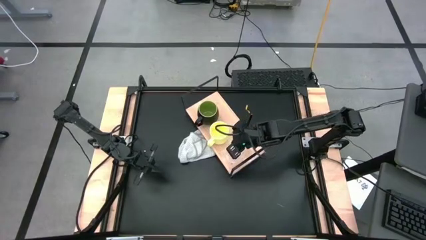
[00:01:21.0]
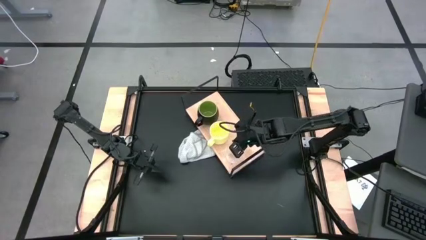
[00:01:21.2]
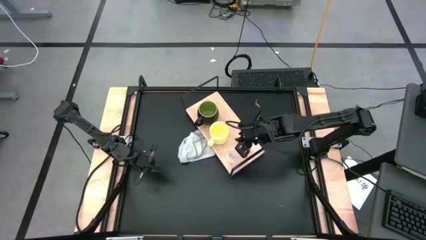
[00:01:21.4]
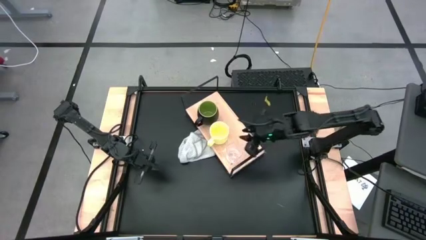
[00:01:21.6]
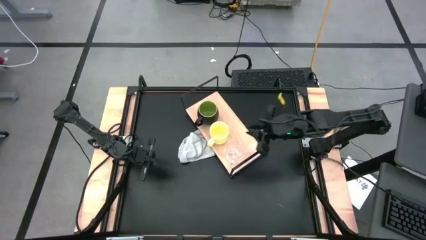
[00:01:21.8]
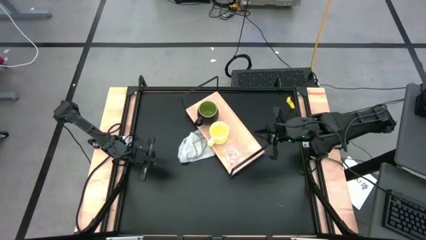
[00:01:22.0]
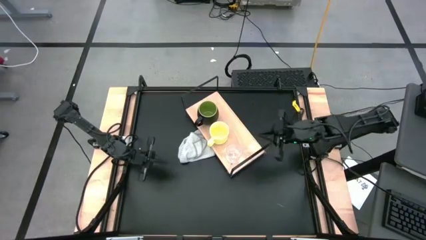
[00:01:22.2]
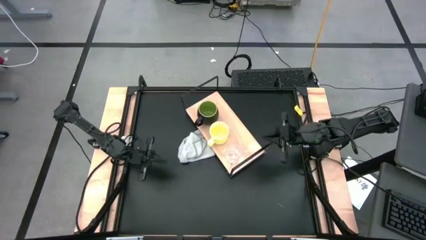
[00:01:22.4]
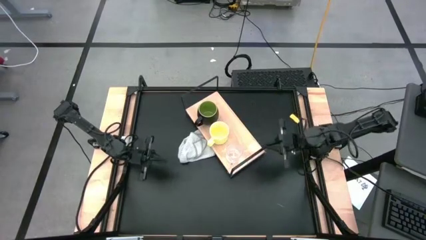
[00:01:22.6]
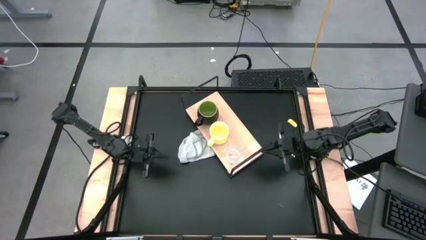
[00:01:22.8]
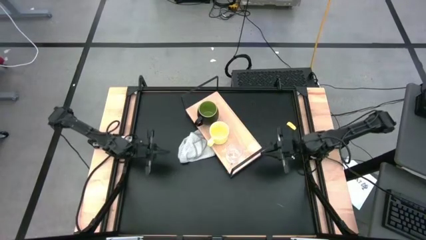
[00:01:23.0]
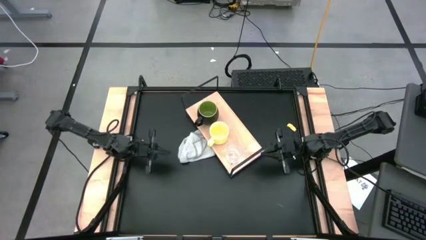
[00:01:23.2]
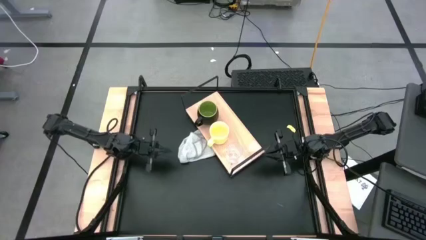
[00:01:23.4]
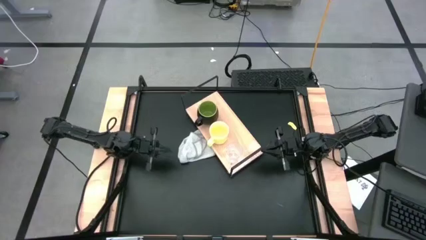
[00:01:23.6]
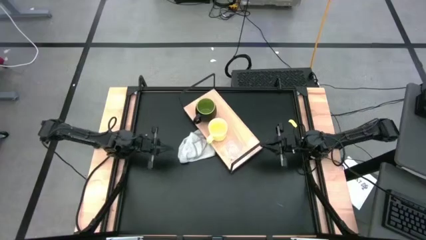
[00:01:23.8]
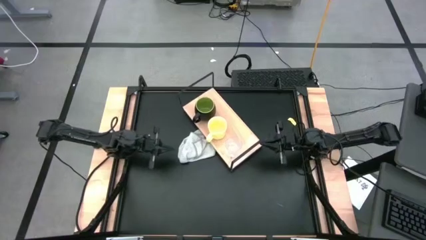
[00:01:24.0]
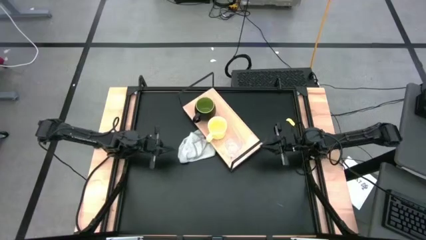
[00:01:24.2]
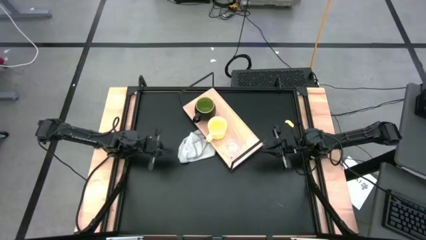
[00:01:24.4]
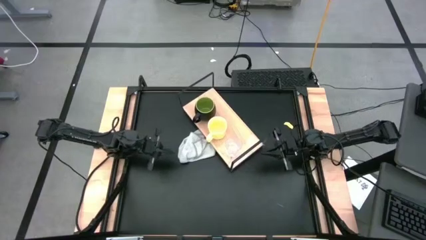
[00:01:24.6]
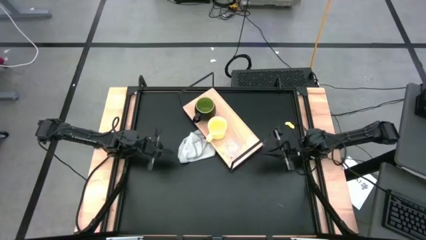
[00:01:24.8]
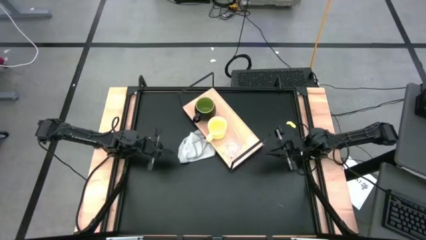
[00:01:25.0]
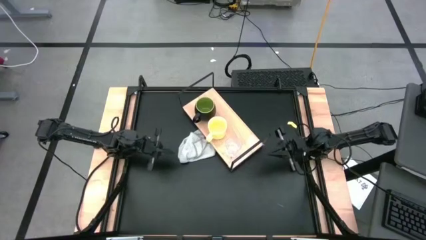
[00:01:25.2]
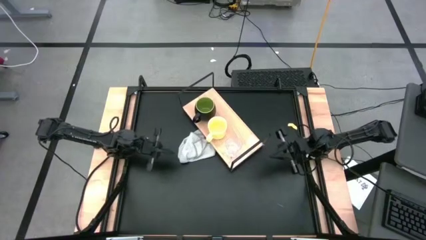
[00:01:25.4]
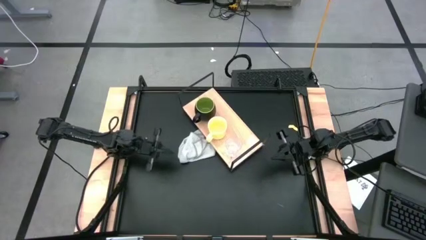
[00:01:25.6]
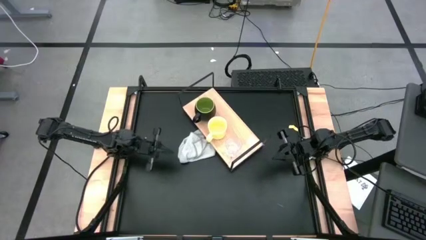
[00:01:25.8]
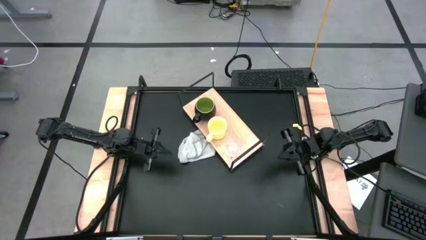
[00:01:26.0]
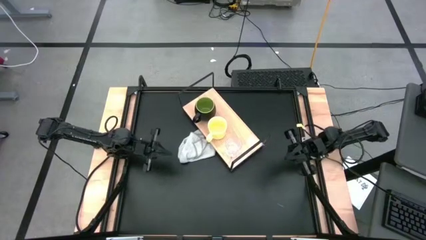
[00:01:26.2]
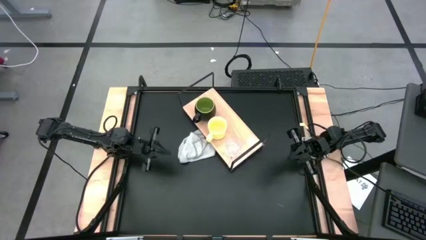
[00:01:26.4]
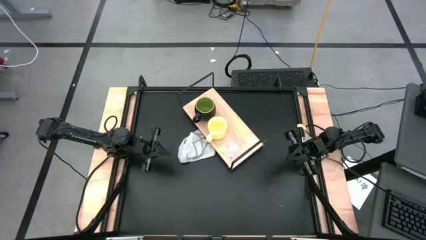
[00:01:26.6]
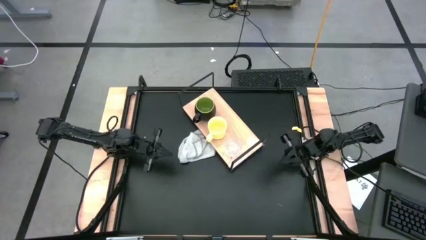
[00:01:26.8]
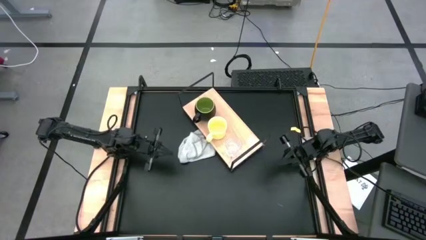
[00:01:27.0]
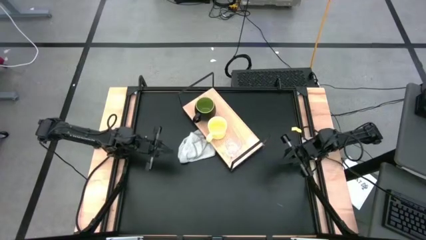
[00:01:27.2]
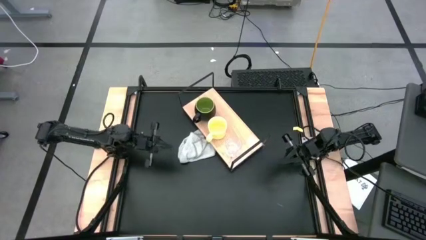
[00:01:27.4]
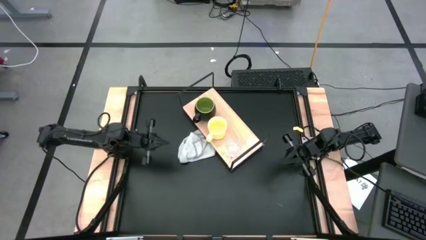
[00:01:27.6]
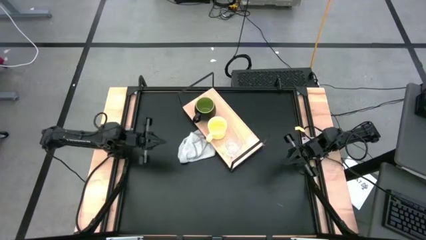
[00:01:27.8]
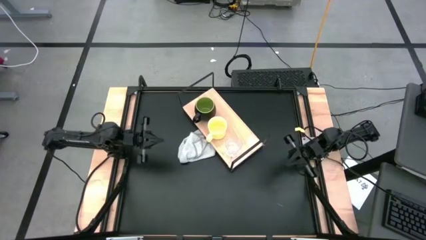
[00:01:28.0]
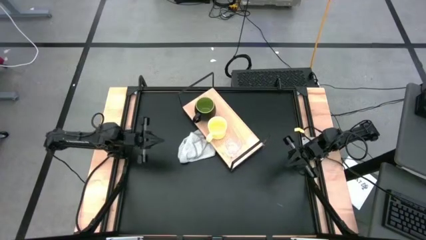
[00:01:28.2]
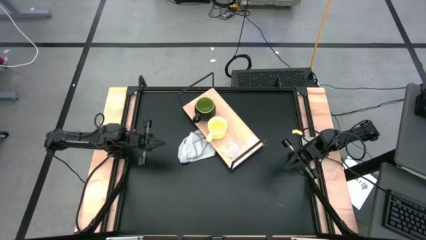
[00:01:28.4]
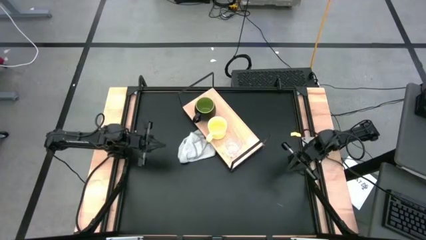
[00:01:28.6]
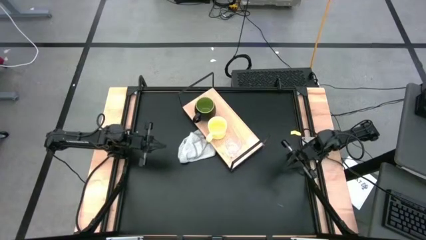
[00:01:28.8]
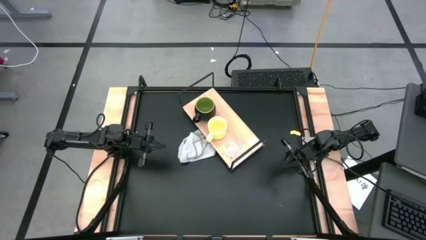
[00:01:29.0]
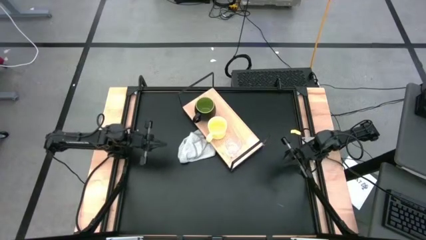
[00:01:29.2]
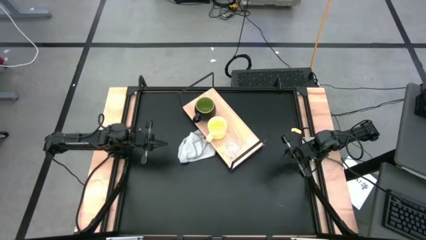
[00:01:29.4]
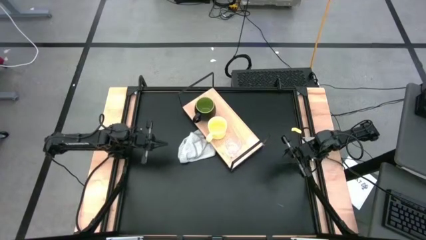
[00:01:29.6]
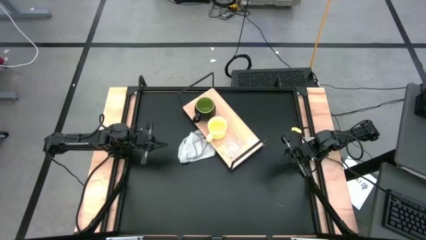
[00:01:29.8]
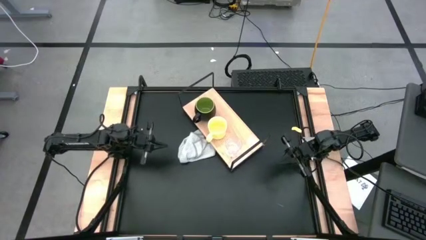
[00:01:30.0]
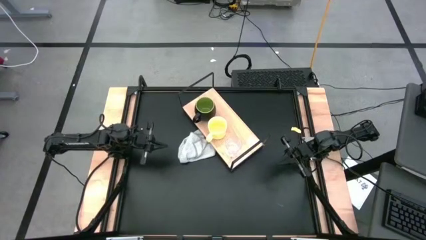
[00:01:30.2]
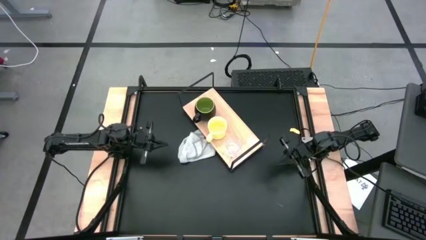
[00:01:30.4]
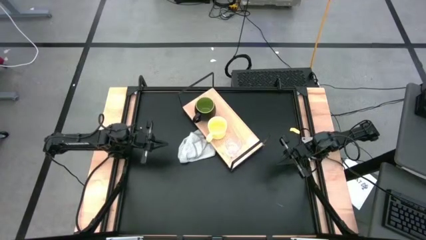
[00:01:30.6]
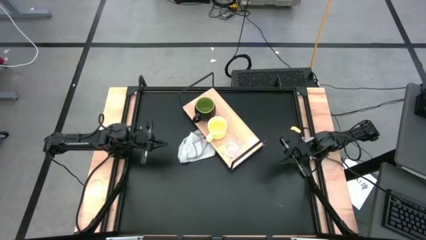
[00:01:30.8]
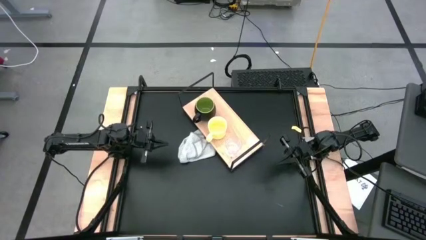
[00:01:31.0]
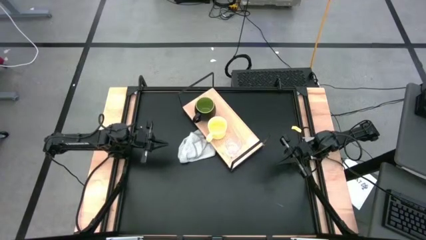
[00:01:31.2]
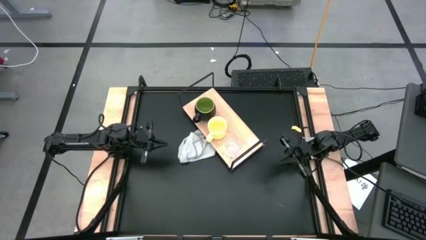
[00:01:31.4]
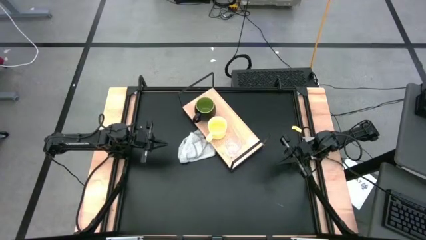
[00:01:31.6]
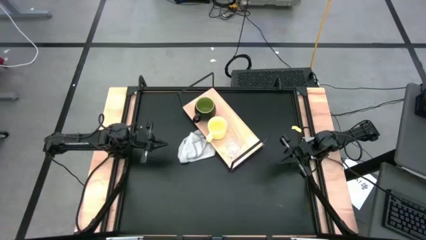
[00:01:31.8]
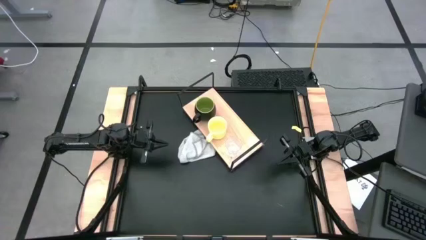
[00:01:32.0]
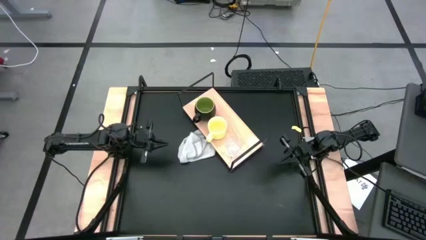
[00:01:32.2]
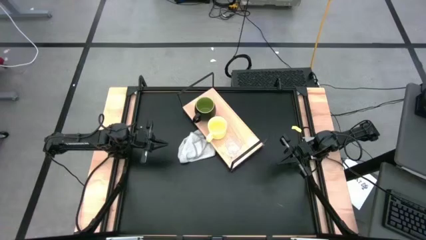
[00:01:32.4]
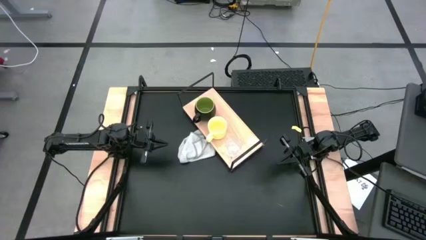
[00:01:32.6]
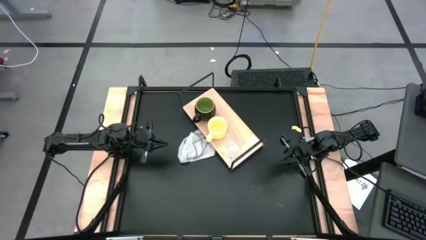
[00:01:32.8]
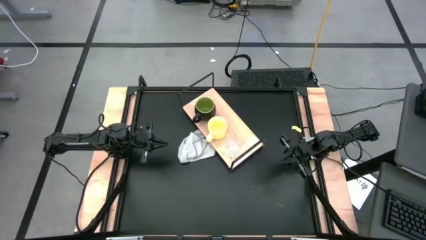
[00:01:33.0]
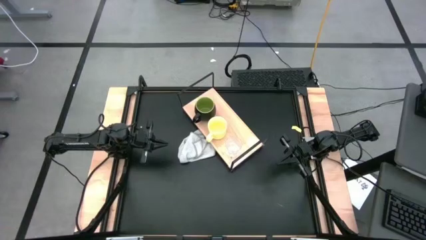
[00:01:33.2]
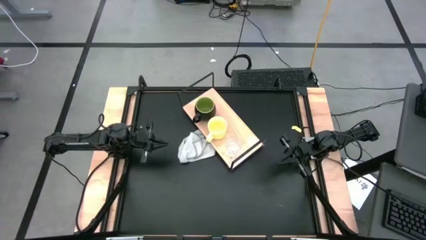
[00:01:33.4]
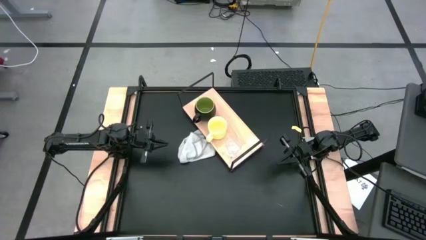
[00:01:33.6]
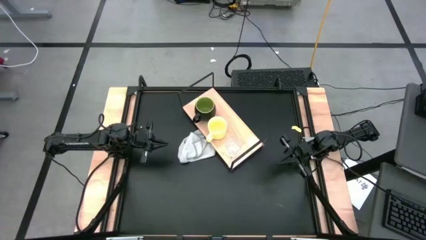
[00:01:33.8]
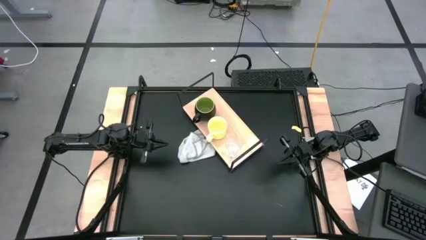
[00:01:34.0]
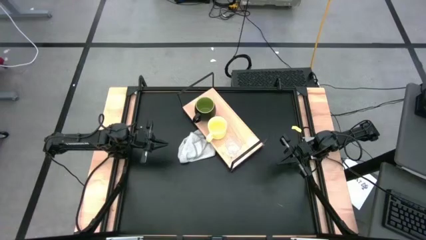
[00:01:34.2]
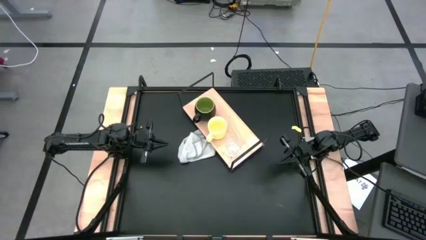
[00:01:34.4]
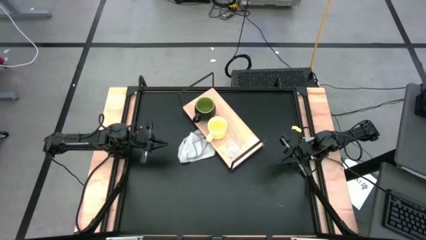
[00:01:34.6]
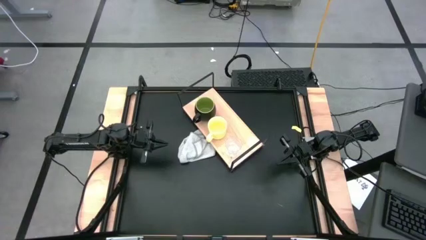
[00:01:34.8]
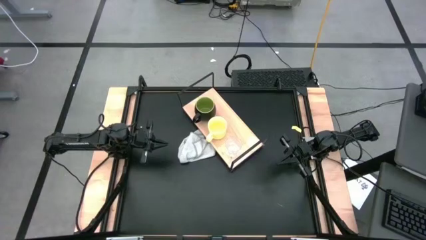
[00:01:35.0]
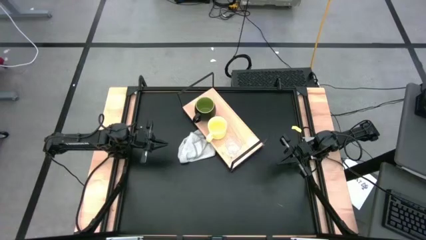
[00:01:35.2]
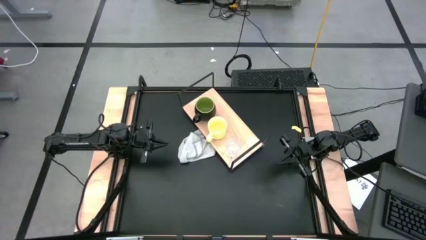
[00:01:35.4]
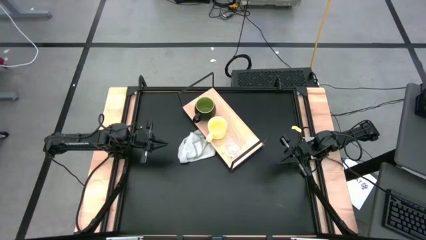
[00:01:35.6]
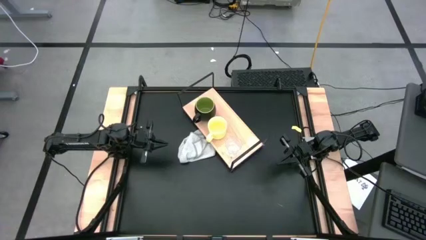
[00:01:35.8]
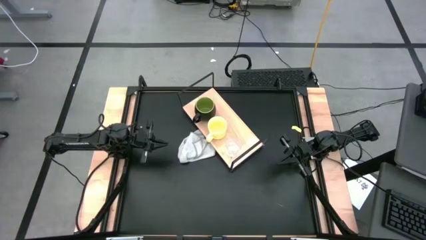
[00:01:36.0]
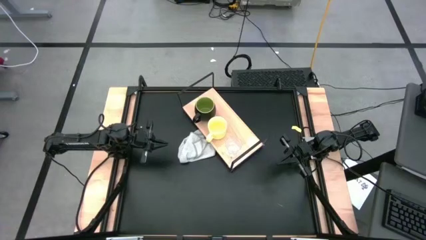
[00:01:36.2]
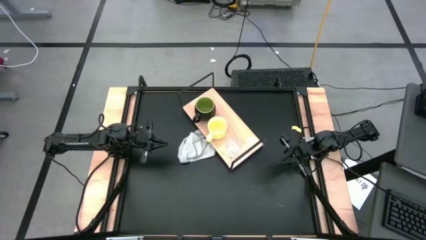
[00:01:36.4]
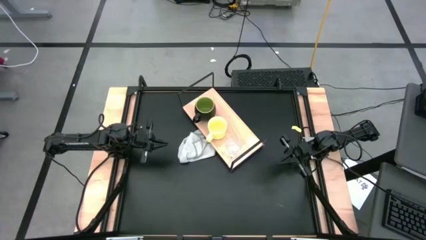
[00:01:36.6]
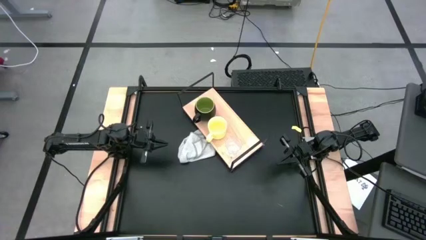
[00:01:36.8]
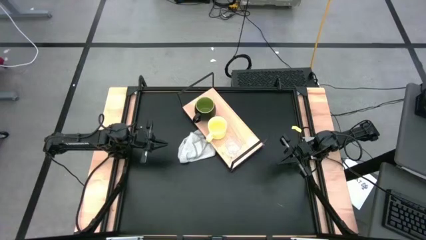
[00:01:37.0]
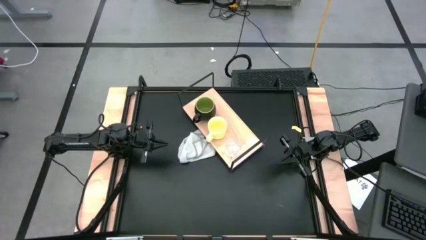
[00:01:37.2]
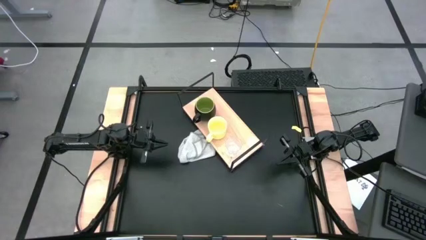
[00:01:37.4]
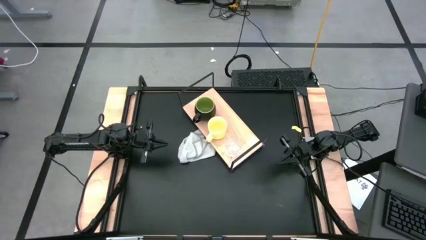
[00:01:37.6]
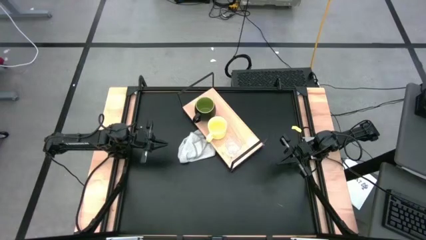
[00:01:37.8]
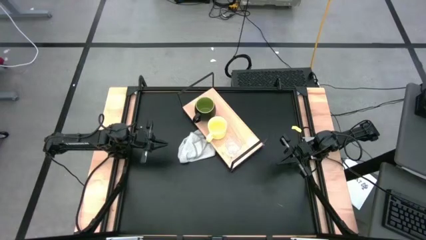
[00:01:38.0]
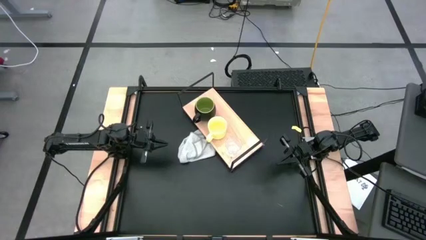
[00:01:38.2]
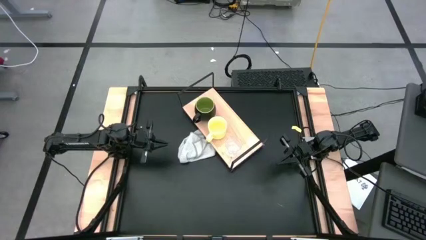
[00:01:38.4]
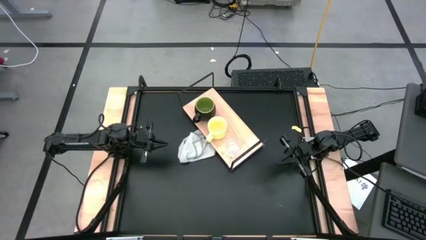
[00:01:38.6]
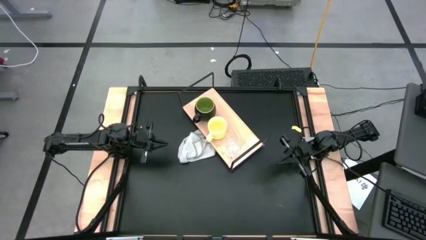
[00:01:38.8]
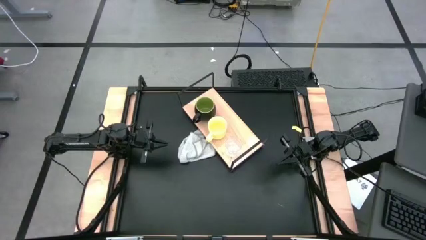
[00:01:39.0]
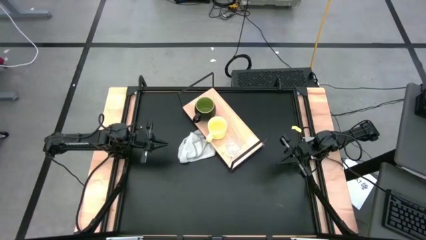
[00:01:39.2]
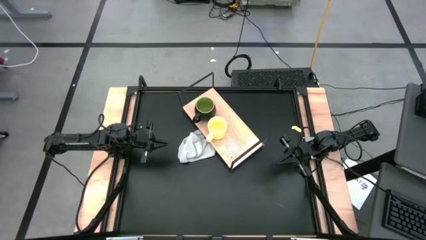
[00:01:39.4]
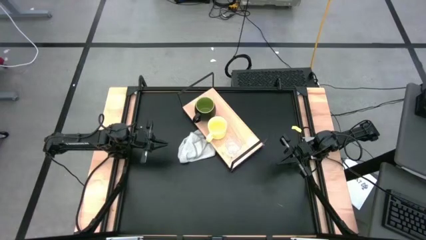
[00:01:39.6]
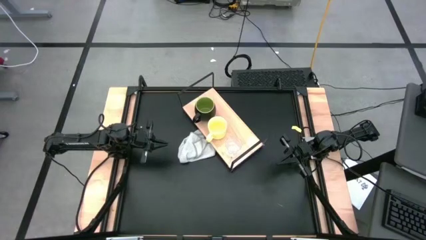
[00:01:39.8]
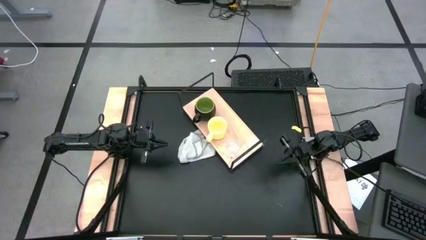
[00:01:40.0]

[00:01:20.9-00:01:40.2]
Task: Stack small to large cups/mugs on shelf
Return to Home Position
